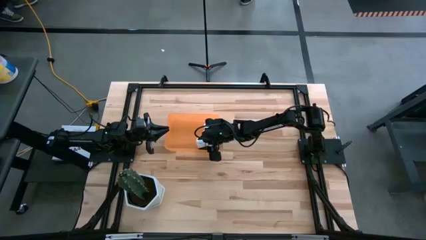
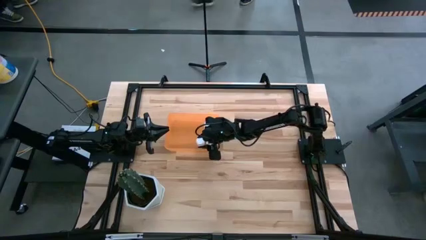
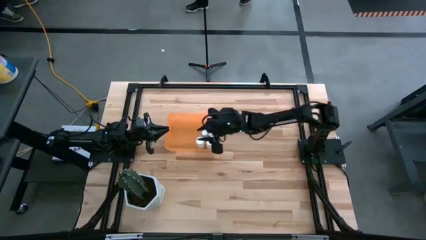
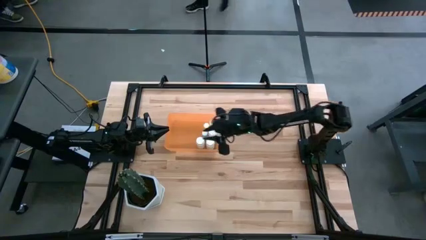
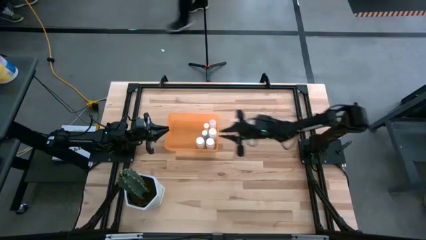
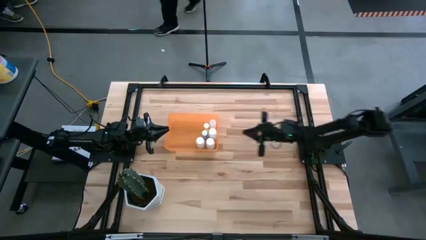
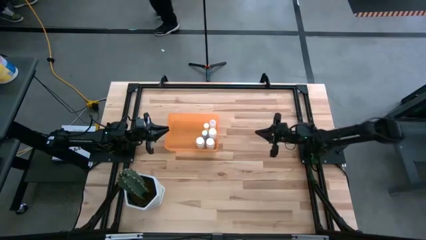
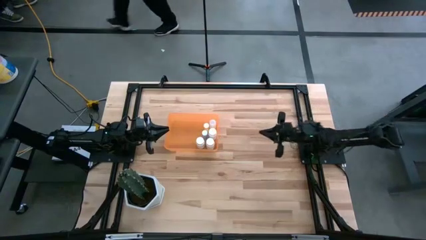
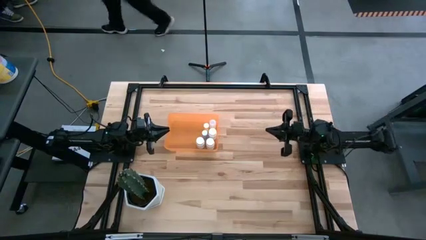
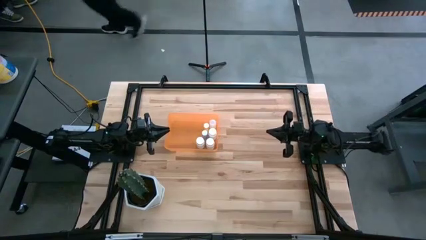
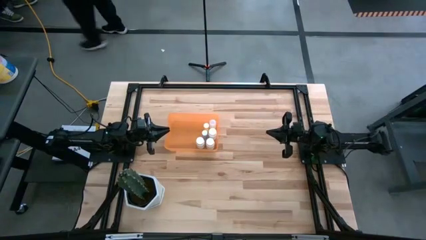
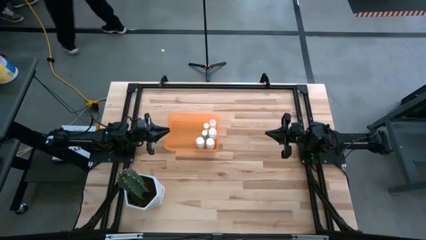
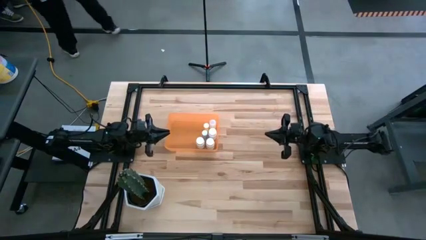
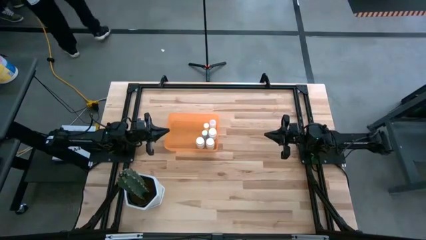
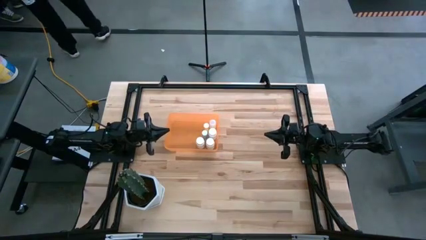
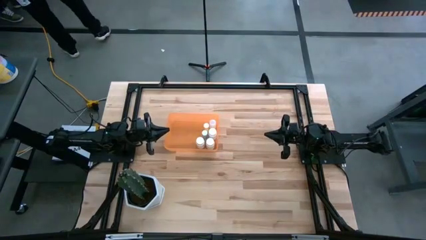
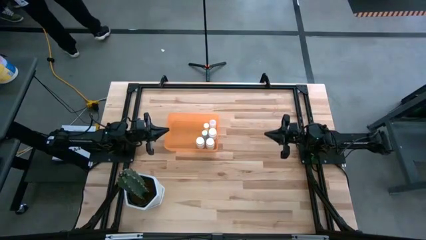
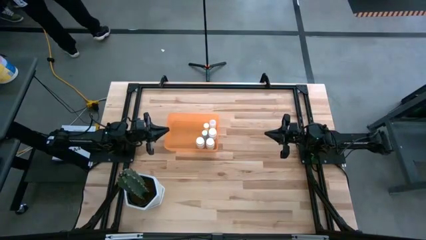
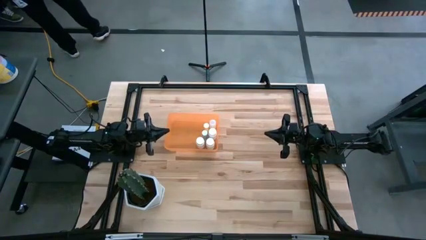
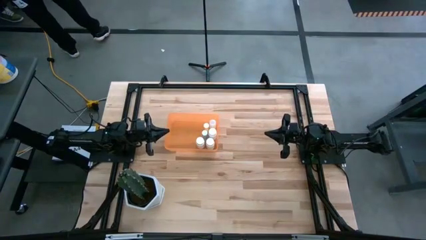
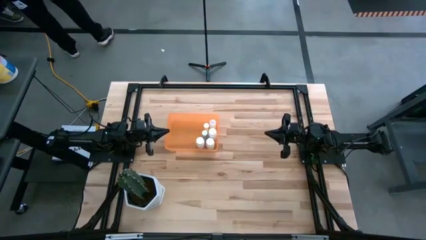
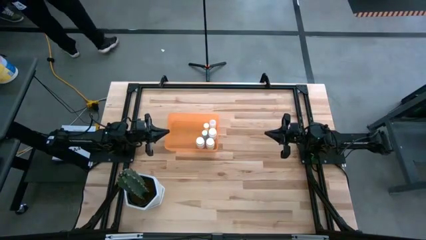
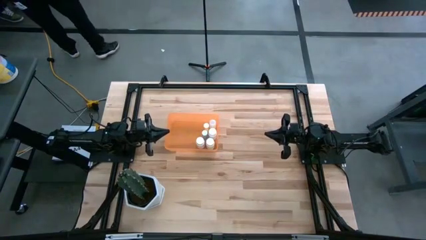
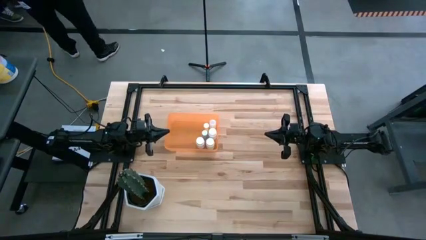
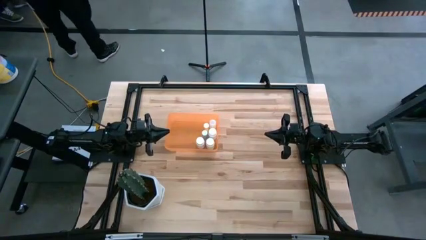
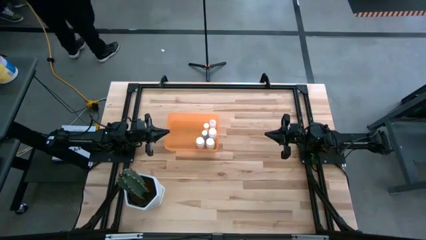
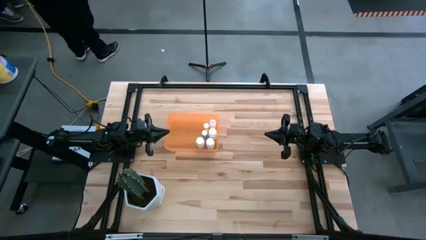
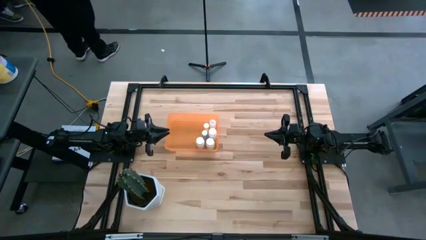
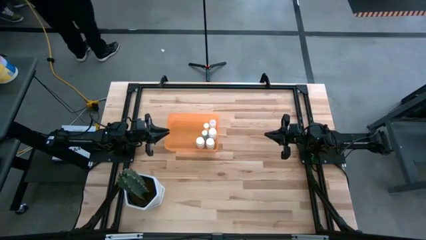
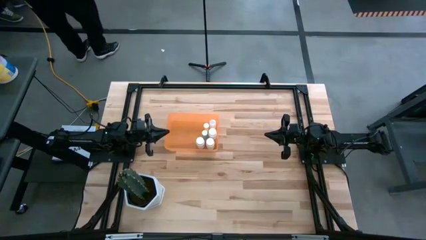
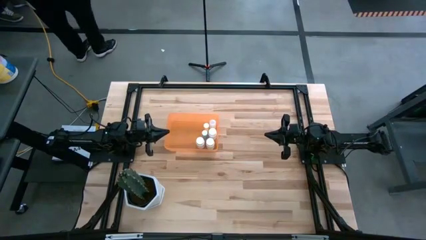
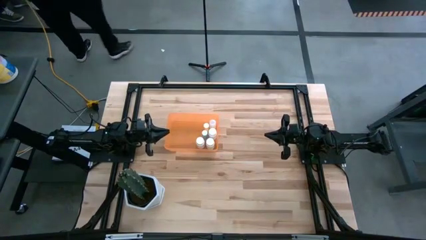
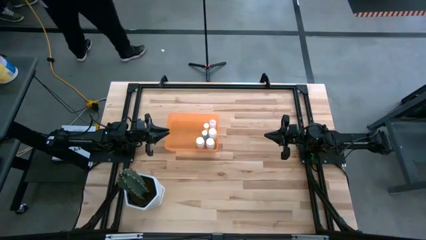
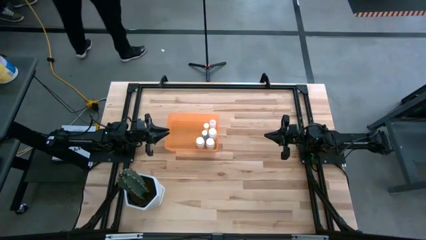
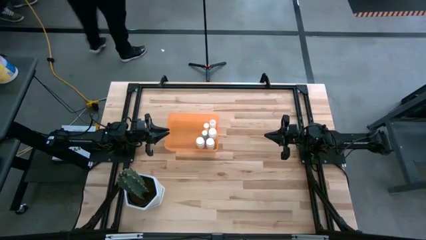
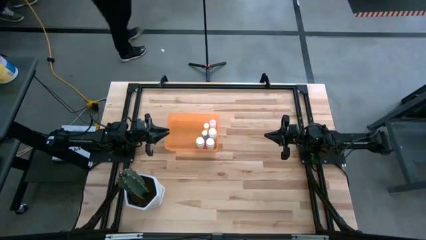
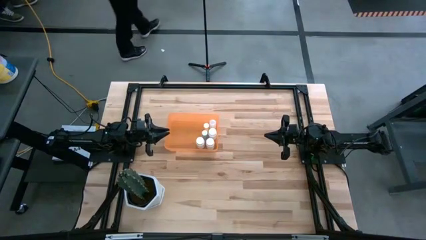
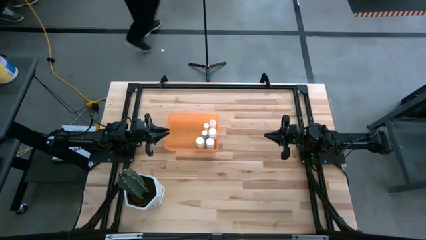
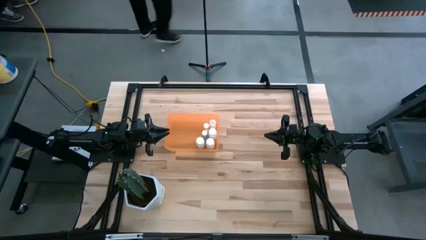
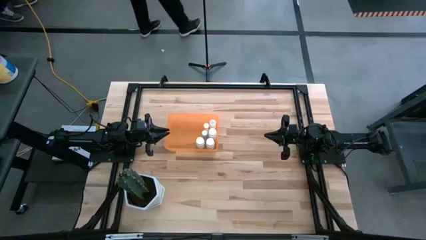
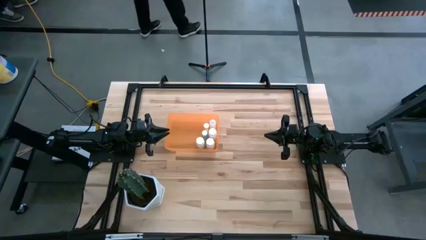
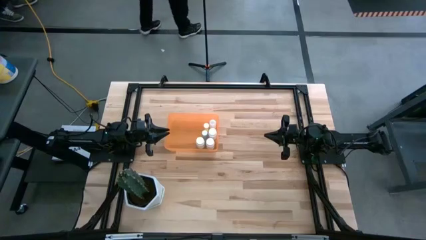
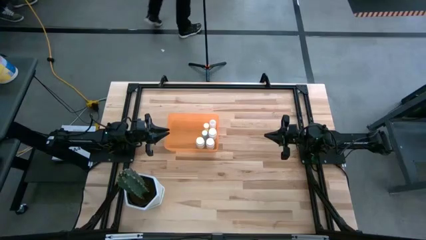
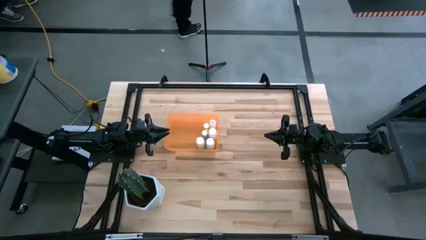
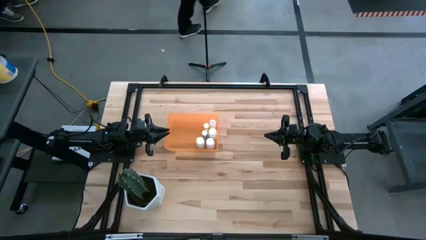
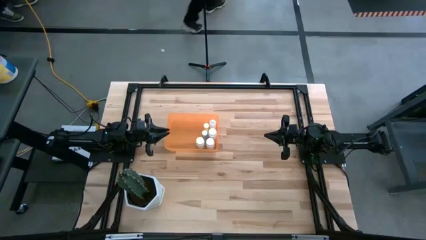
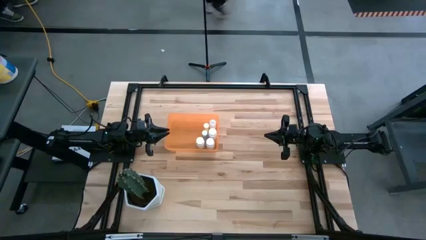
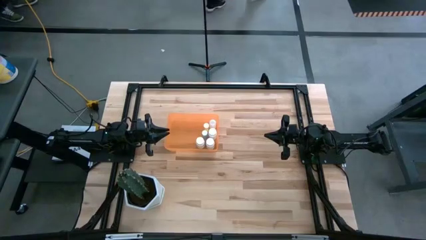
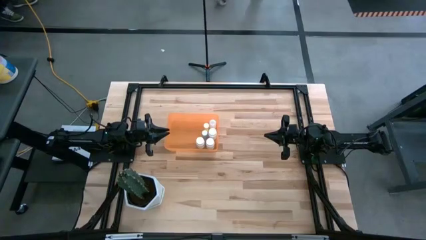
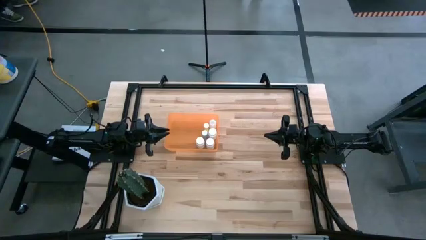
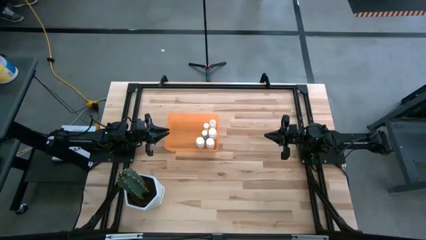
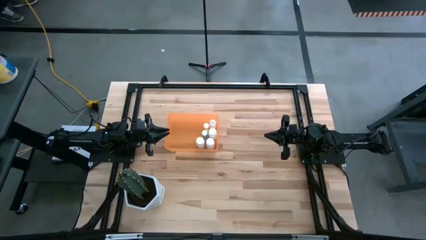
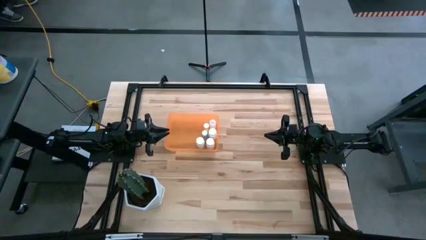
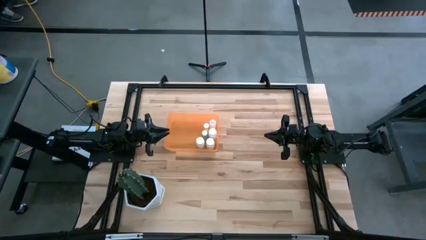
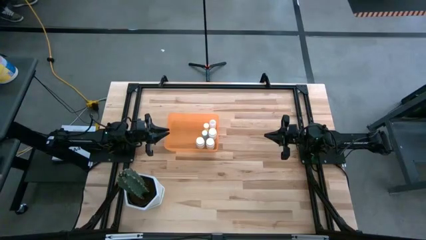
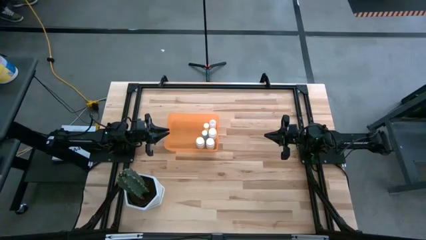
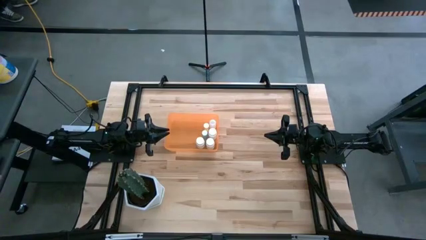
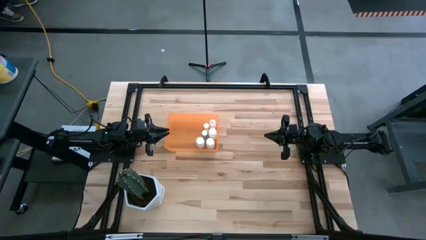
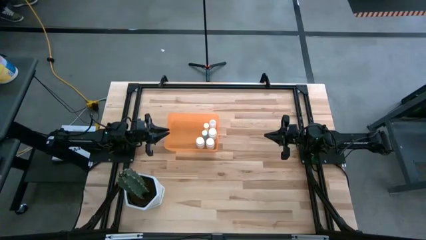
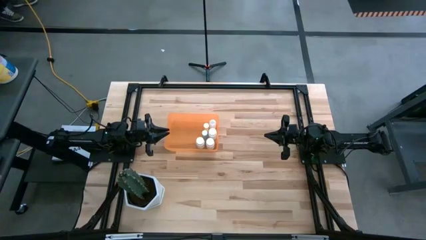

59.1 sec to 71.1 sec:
Task: Pick and place pill bottles into a basket
Return to Home Position
